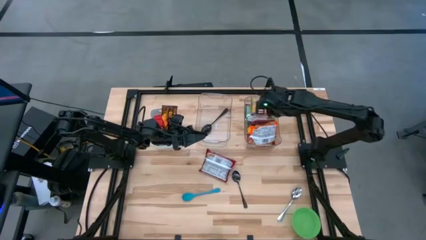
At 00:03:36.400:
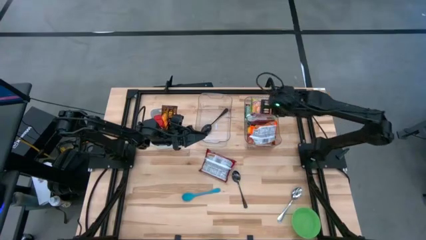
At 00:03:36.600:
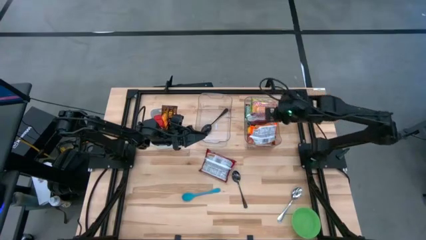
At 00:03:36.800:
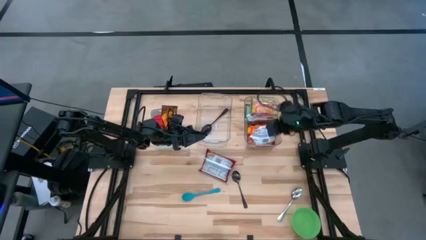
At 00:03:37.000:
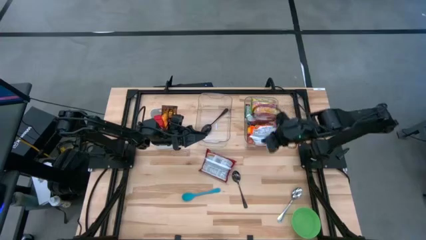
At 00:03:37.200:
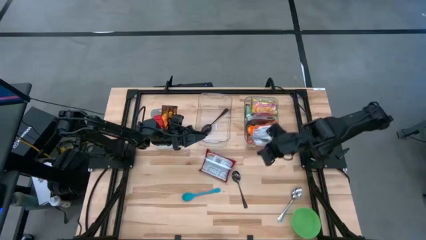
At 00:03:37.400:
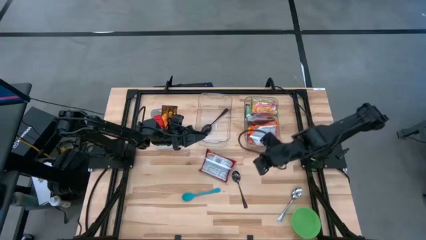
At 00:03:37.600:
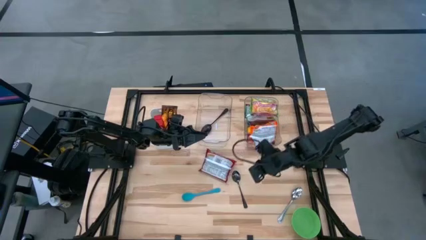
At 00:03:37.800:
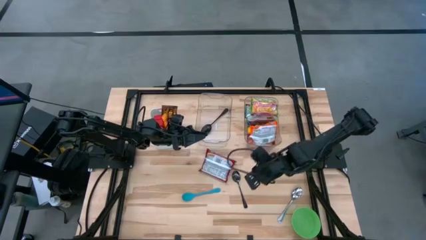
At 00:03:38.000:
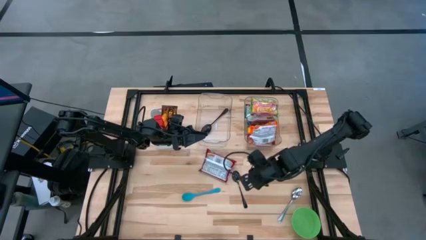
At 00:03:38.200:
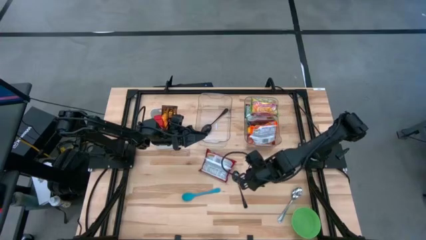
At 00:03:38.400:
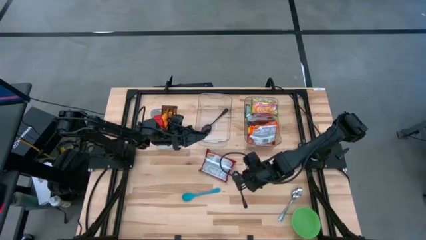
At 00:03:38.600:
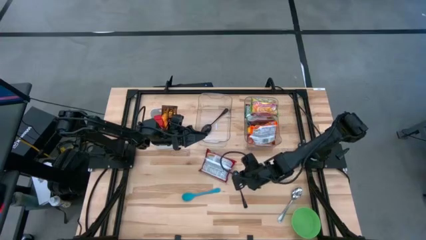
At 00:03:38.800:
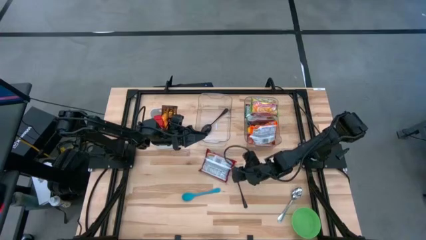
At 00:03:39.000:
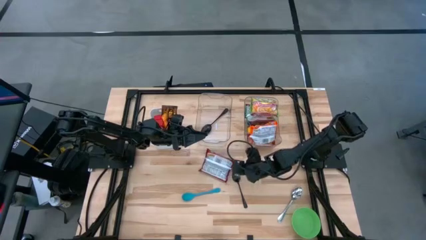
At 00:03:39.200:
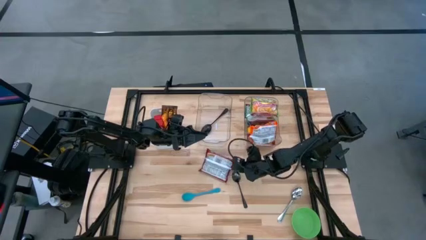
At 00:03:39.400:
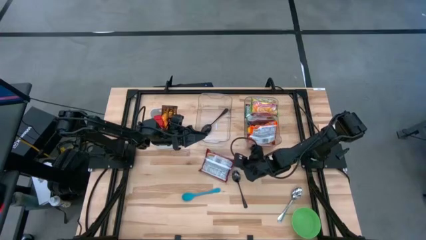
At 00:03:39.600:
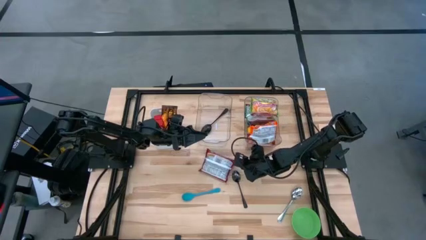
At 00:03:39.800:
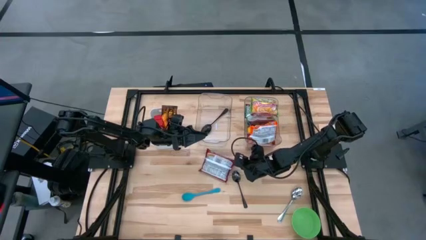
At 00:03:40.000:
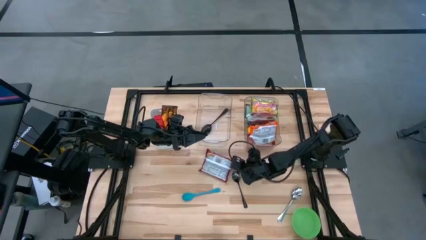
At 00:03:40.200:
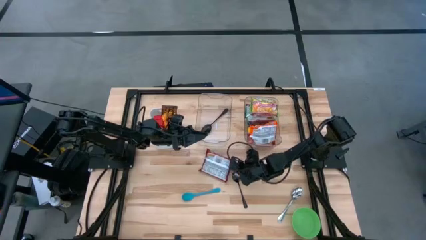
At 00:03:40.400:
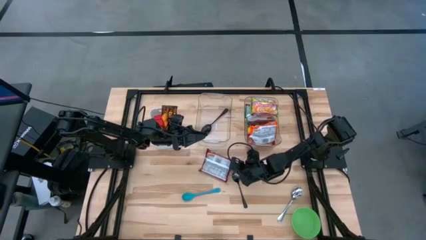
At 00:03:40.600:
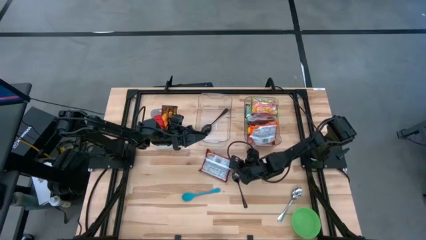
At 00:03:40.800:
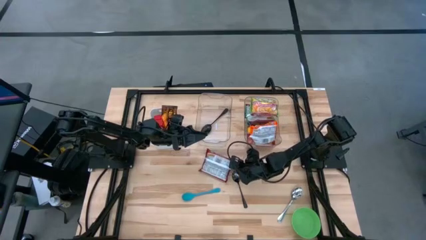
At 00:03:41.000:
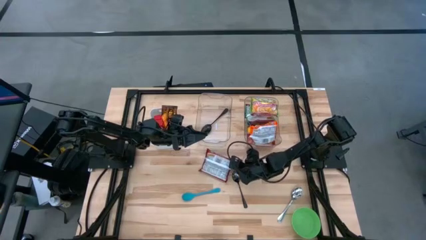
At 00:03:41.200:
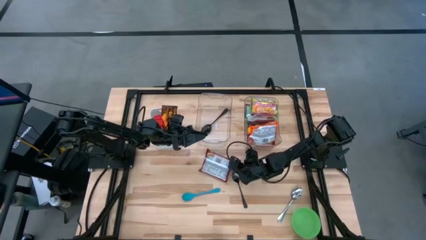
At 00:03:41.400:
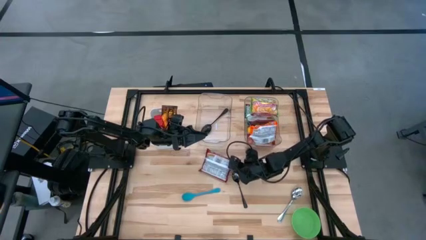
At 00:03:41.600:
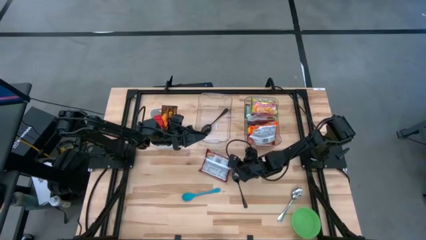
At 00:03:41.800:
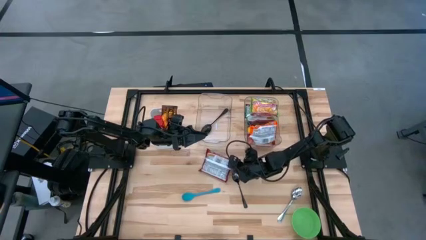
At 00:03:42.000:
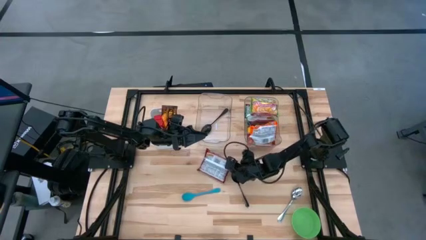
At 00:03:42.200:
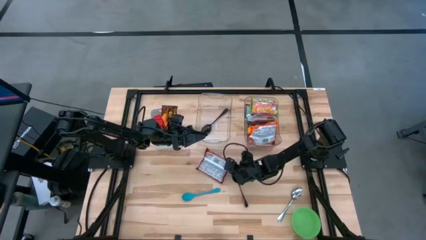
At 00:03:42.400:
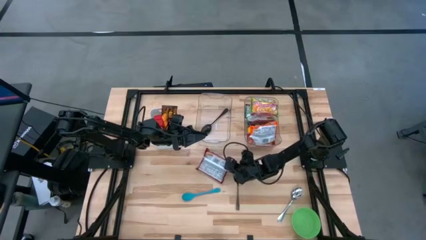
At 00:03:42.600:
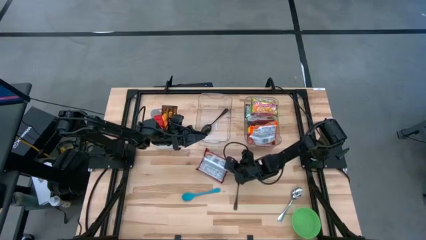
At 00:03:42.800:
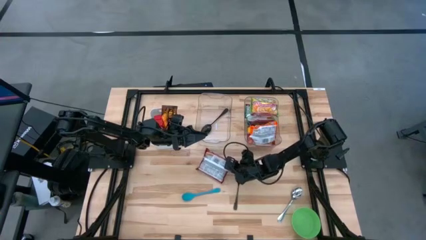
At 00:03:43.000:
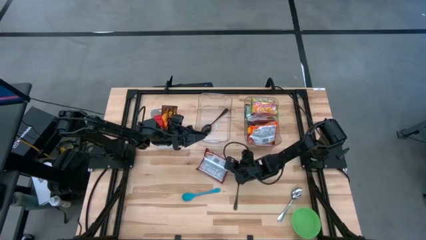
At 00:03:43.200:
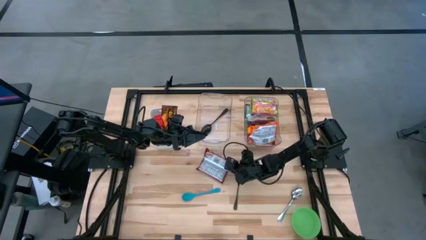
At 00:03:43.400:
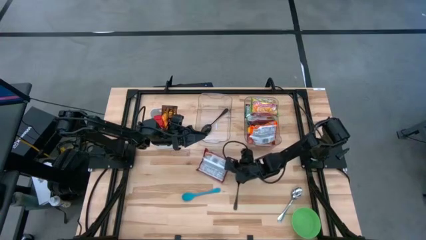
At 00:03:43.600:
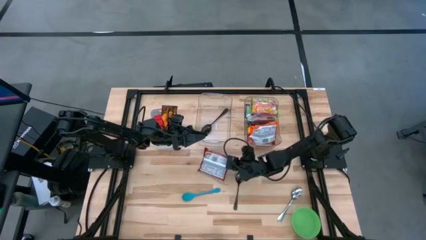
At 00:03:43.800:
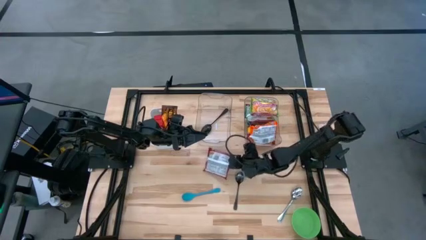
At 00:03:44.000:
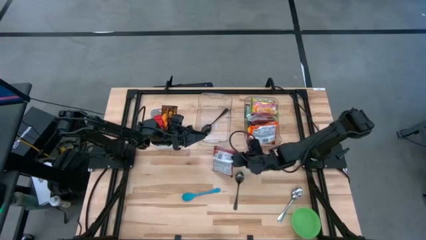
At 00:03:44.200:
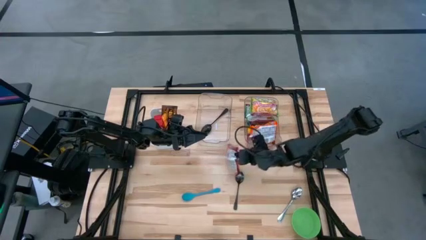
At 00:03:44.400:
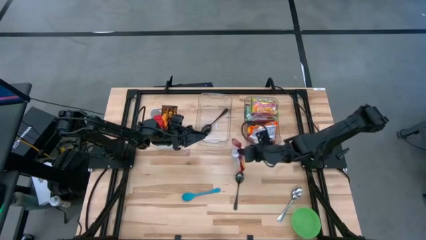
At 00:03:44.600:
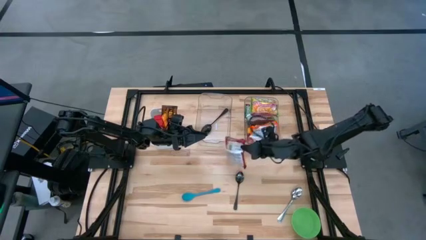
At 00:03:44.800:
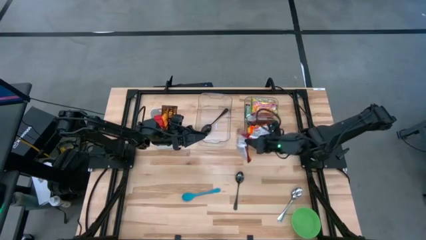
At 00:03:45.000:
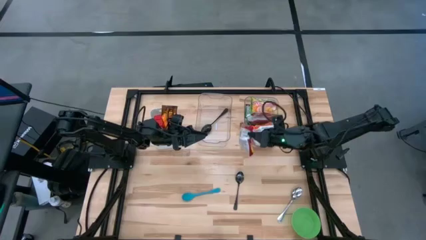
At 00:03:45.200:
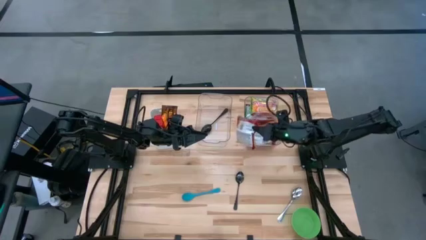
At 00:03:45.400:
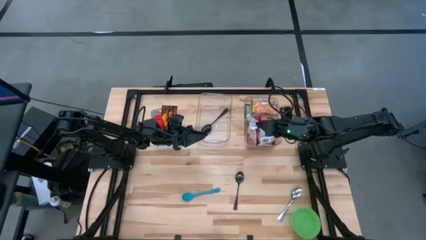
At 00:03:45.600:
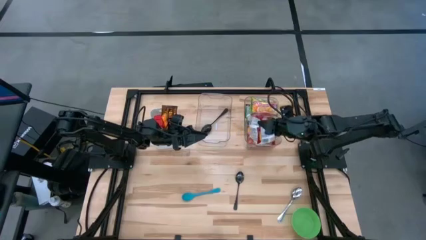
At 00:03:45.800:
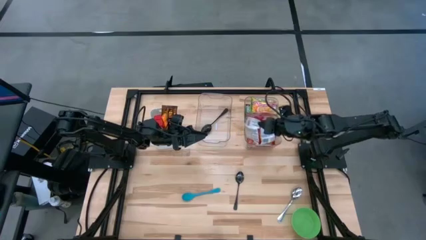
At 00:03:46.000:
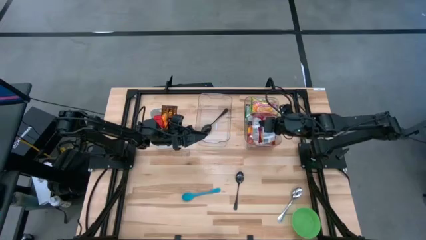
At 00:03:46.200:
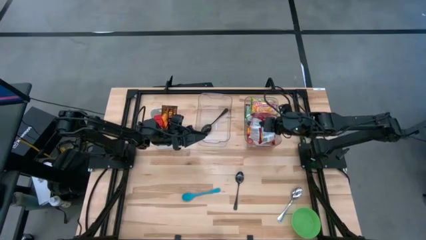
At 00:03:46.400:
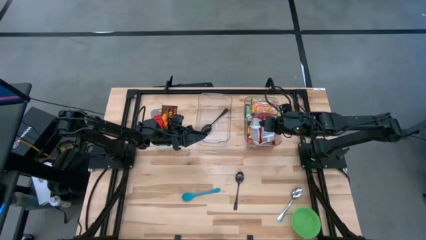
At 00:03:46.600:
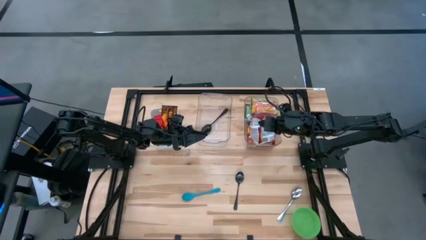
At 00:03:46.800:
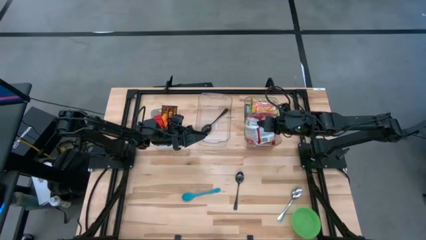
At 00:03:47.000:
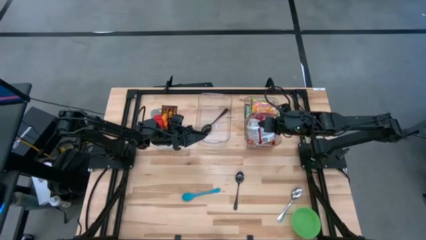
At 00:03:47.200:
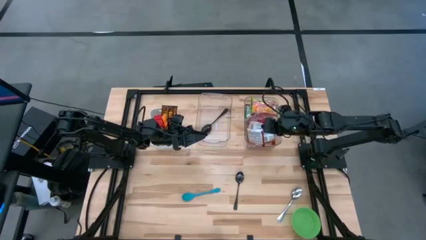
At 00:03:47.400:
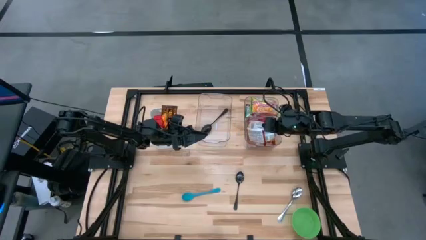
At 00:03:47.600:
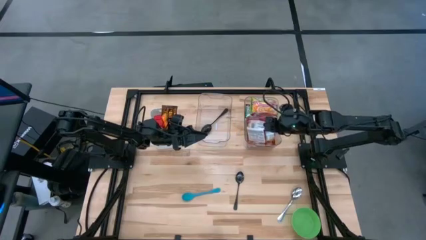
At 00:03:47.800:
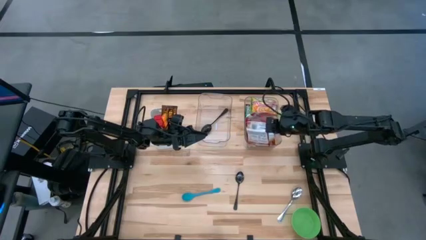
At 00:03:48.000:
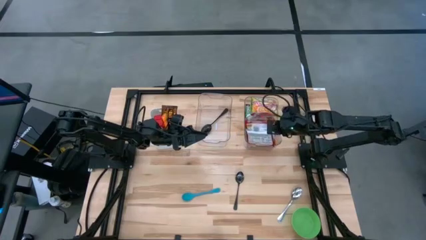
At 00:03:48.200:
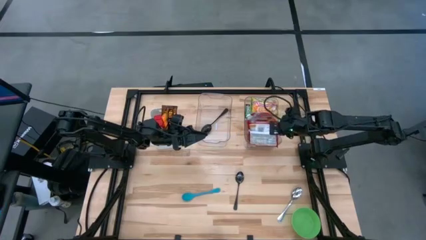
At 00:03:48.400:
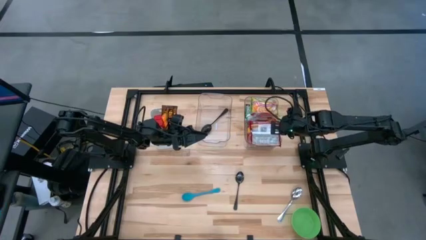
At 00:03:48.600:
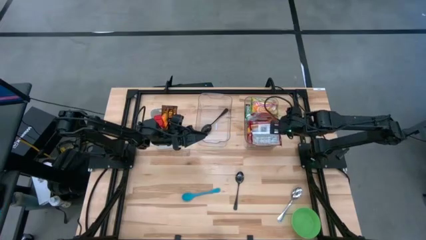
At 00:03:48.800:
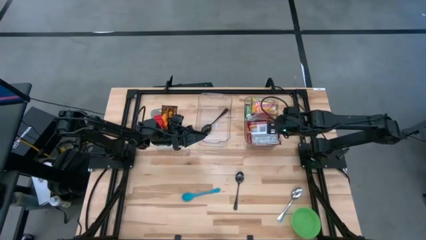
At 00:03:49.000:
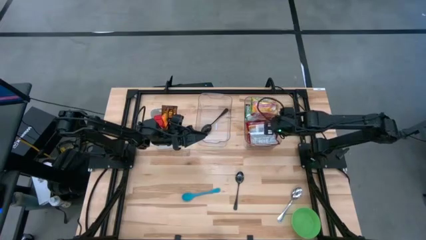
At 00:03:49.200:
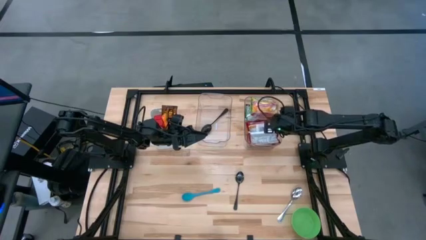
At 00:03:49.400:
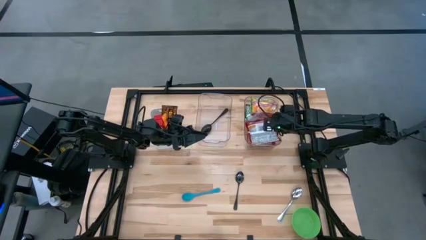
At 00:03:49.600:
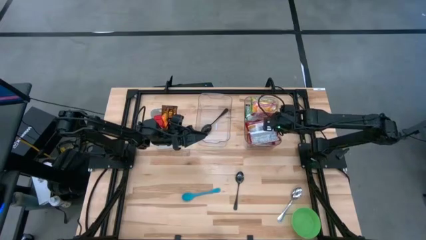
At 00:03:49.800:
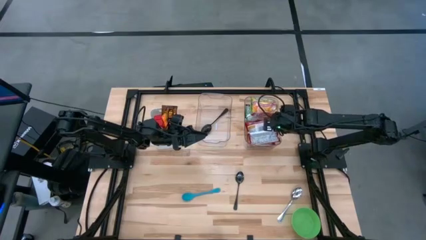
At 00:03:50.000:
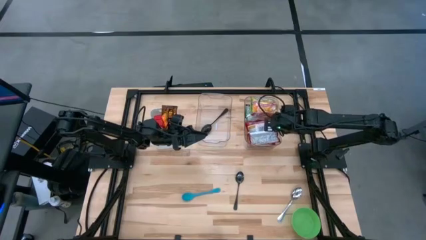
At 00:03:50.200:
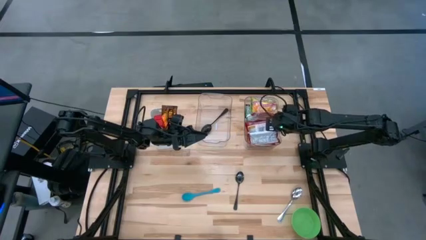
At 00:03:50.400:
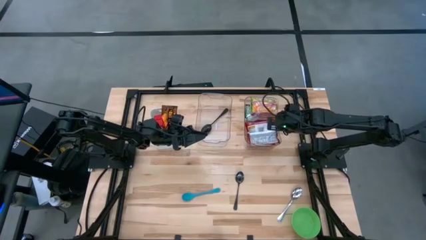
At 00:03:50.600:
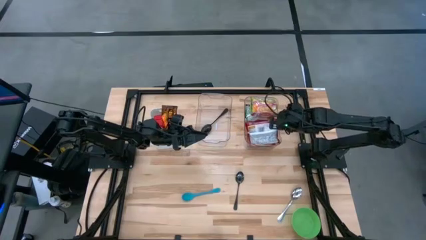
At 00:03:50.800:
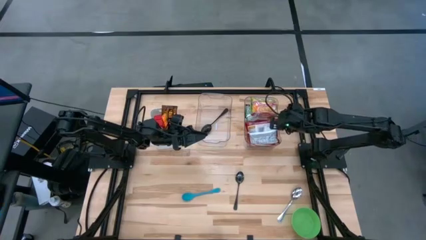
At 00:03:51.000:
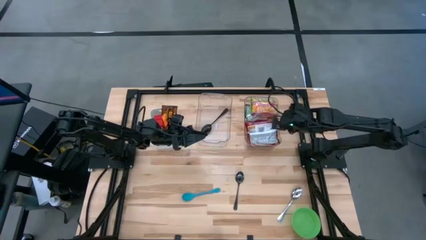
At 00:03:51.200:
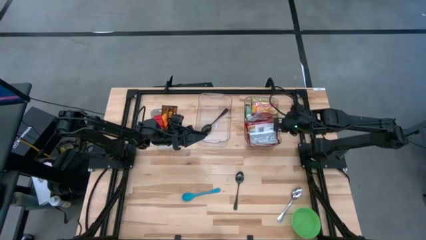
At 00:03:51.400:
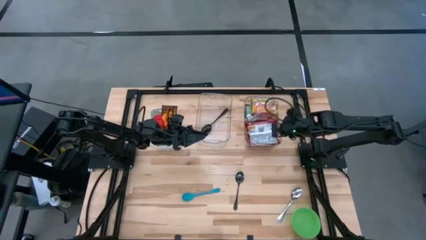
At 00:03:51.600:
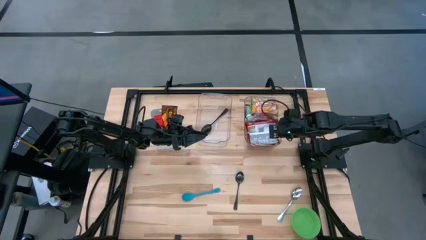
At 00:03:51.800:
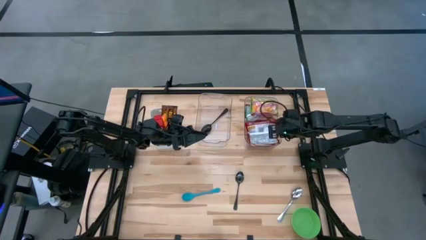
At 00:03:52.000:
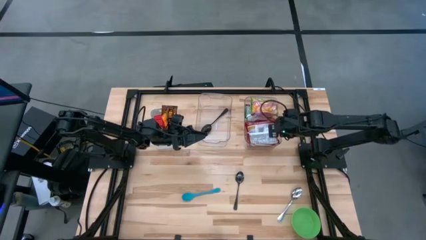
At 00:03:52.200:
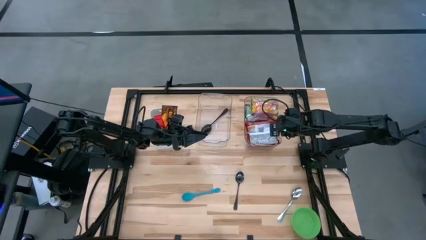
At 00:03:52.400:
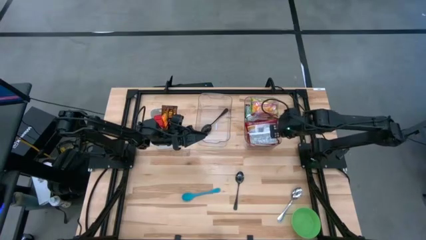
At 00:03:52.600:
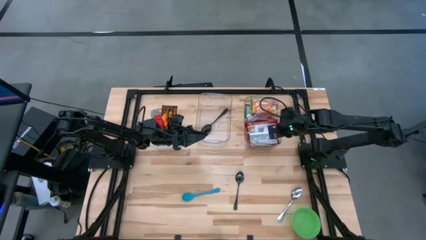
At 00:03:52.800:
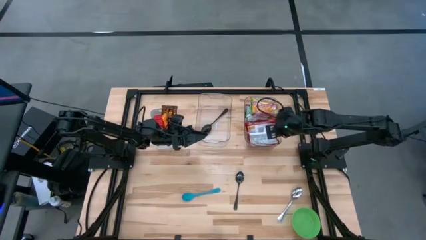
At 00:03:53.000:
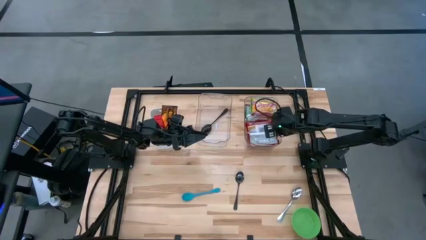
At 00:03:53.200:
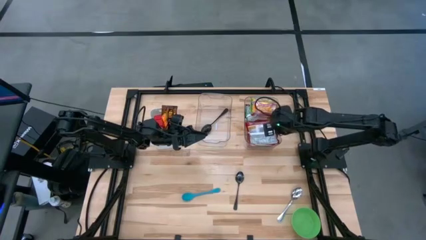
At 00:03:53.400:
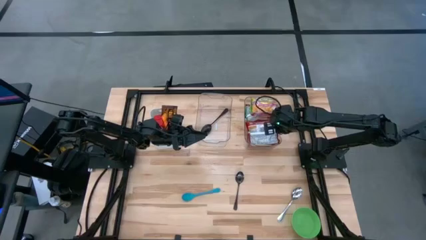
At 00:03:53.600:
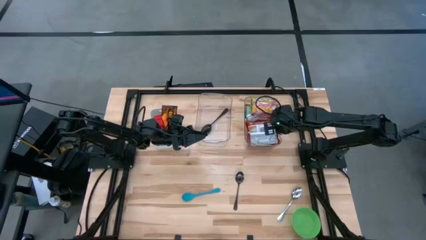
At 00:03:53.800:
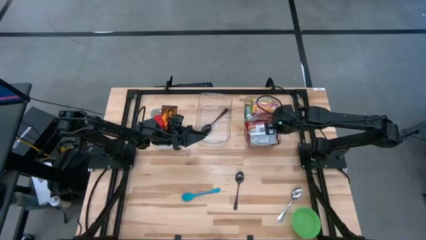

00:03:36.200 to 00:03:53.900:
Task: Pick & Place Food Item
Put the red noodle pack into the right transparent bin
